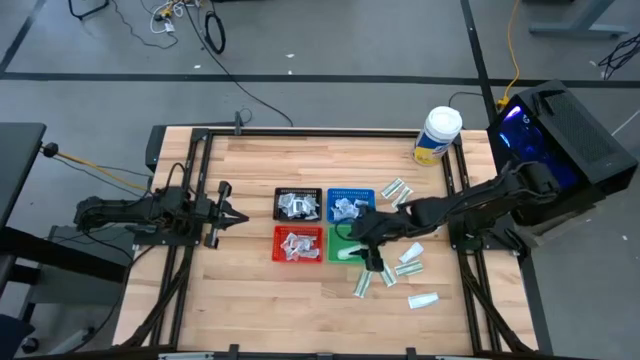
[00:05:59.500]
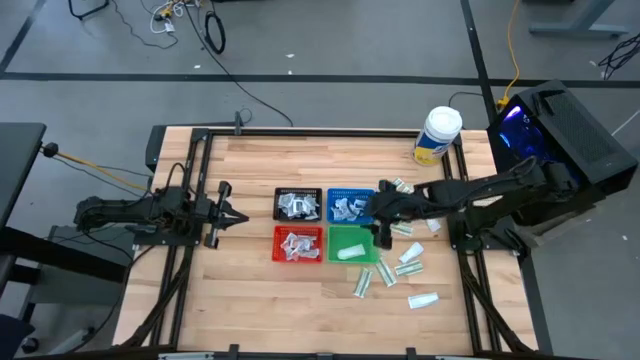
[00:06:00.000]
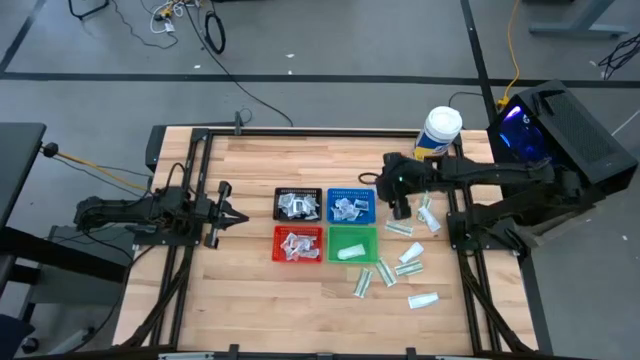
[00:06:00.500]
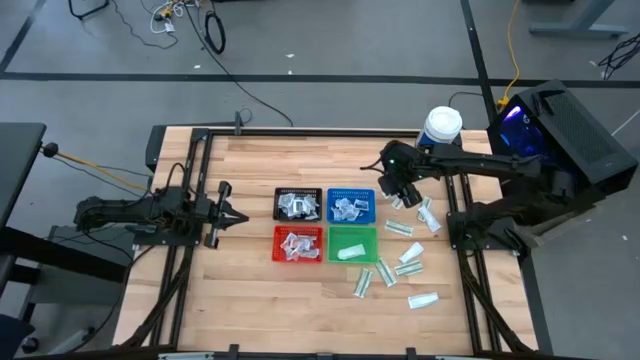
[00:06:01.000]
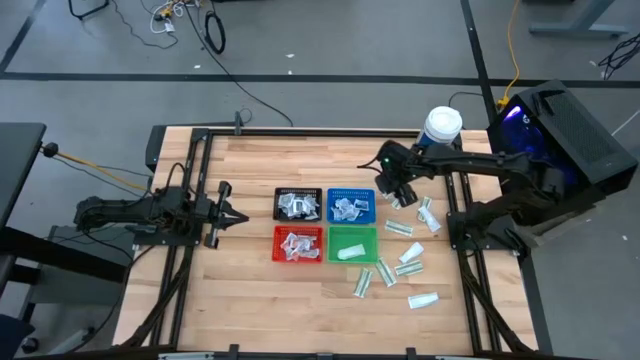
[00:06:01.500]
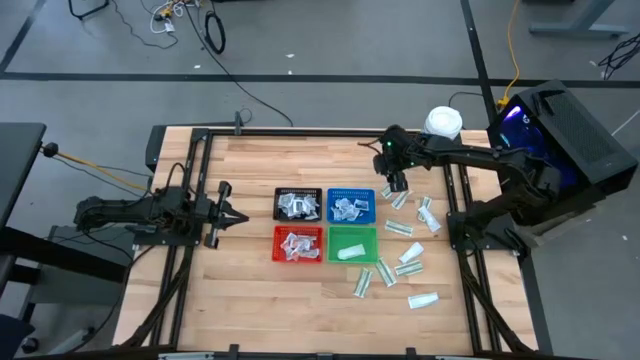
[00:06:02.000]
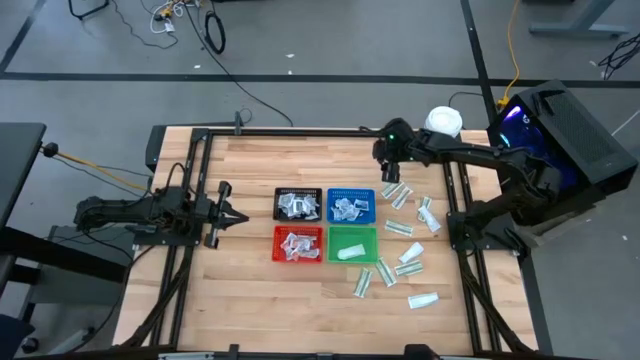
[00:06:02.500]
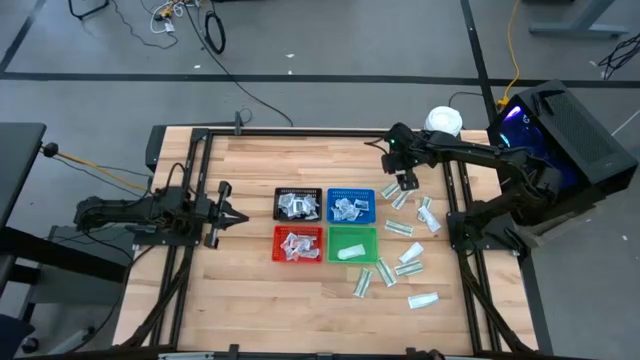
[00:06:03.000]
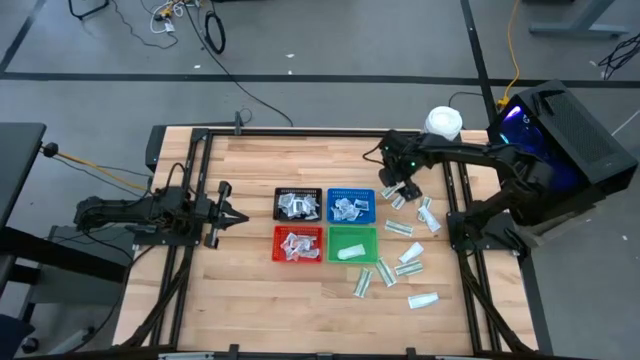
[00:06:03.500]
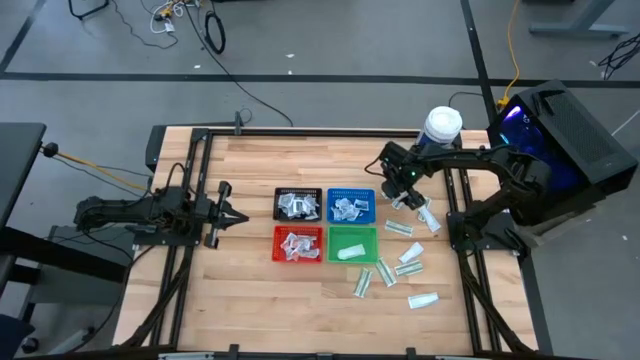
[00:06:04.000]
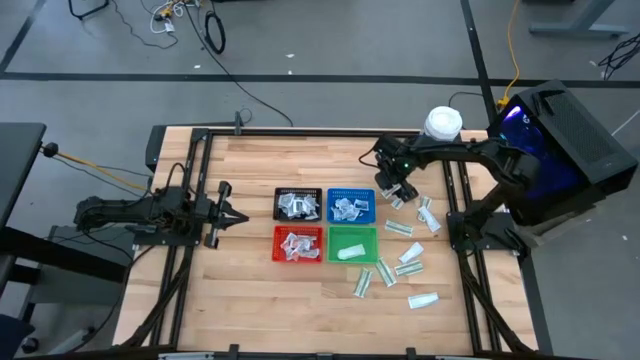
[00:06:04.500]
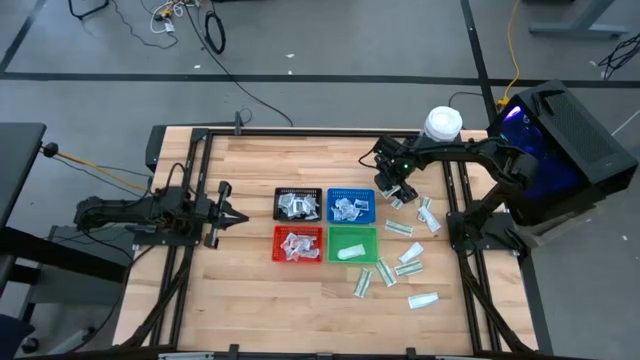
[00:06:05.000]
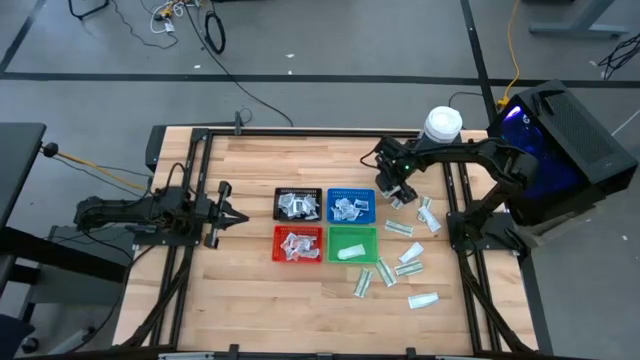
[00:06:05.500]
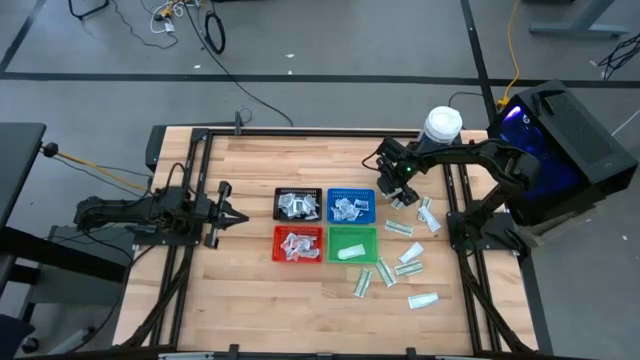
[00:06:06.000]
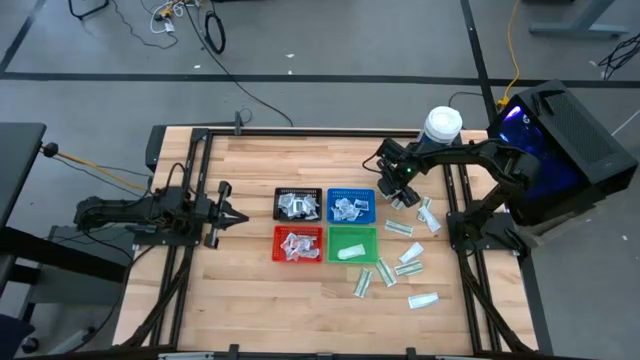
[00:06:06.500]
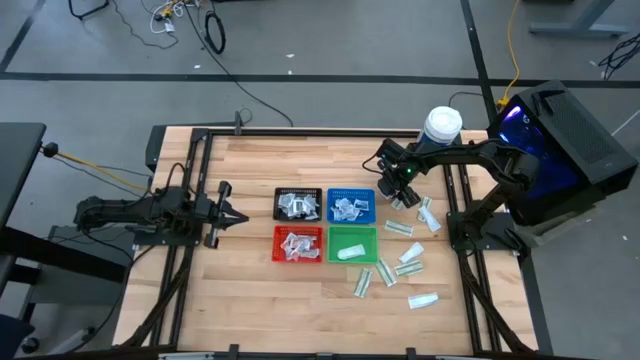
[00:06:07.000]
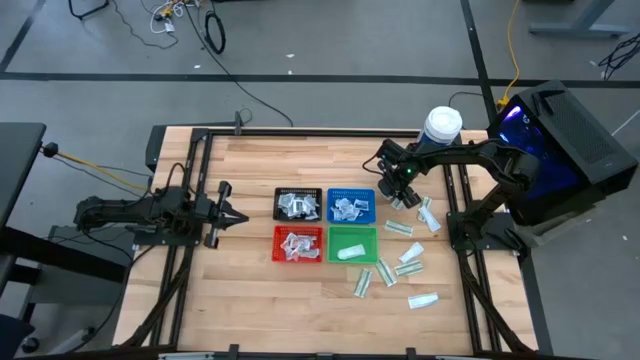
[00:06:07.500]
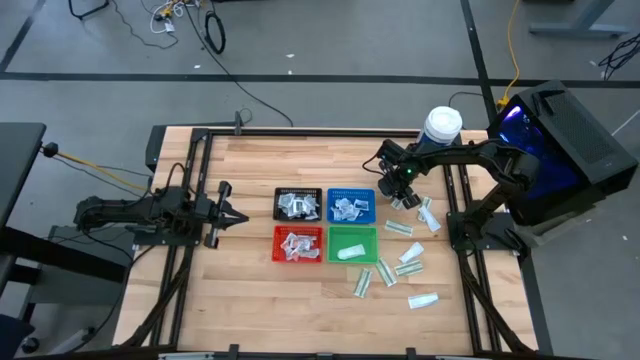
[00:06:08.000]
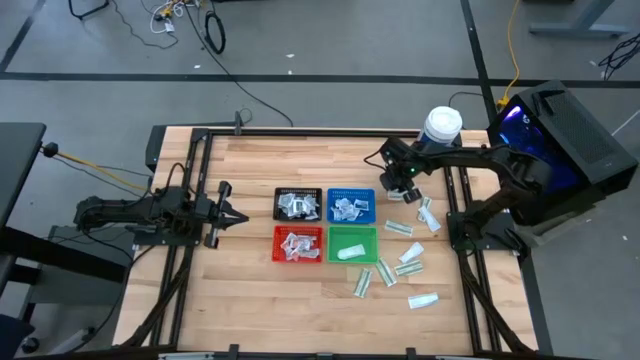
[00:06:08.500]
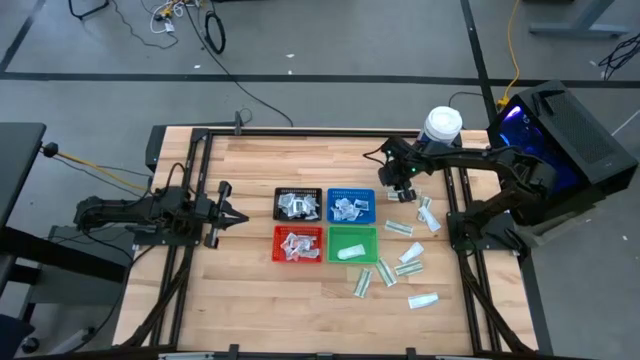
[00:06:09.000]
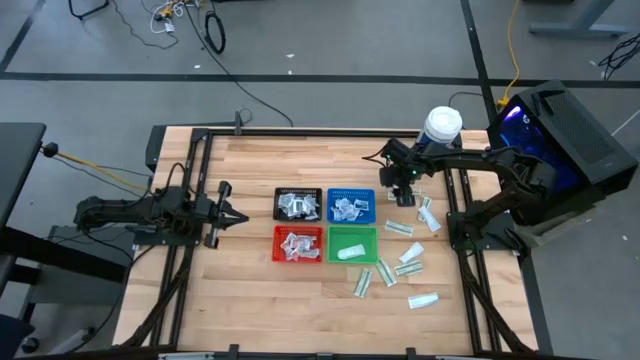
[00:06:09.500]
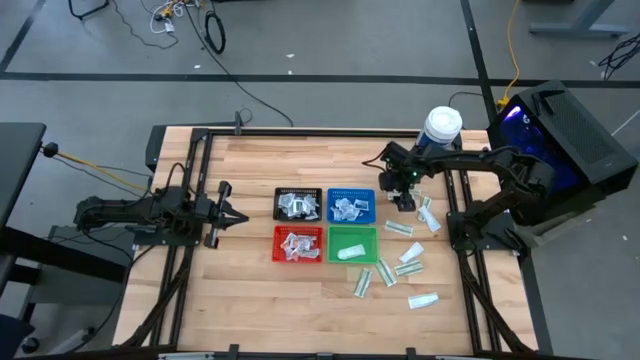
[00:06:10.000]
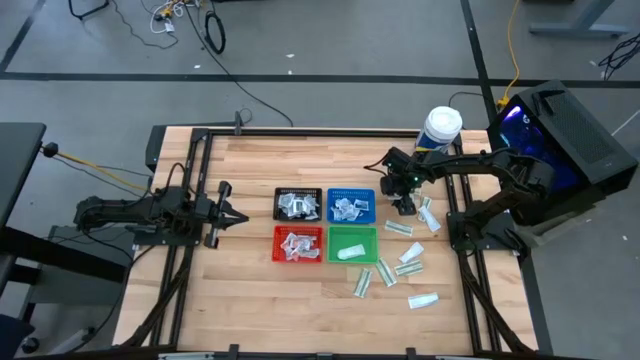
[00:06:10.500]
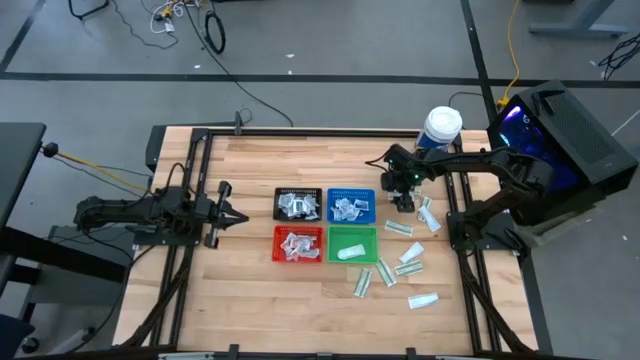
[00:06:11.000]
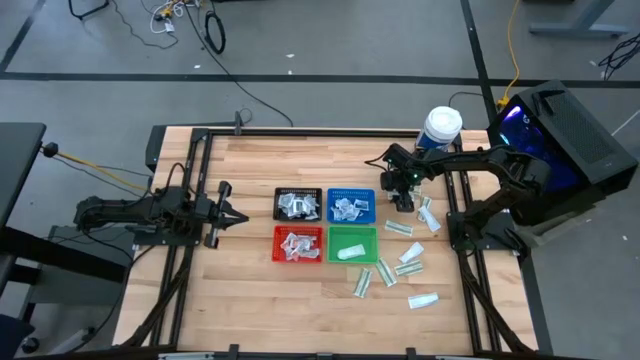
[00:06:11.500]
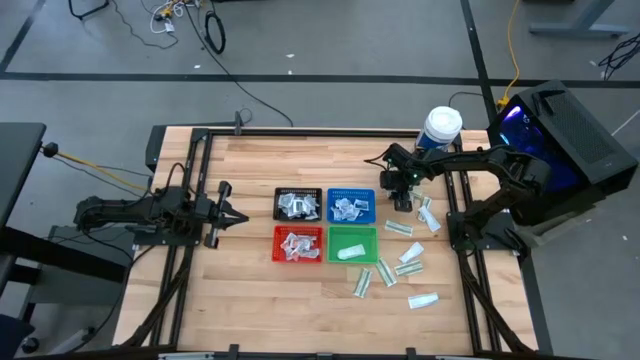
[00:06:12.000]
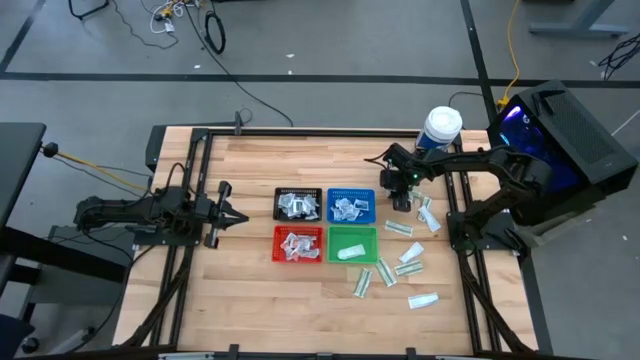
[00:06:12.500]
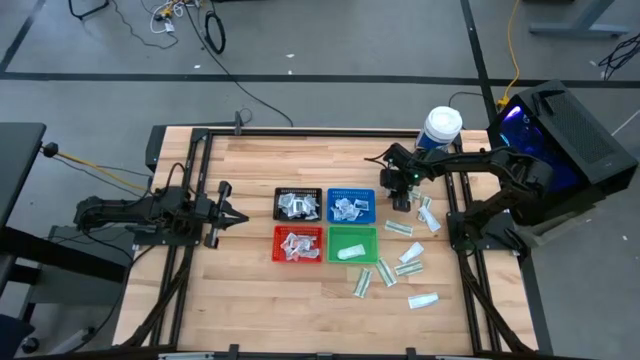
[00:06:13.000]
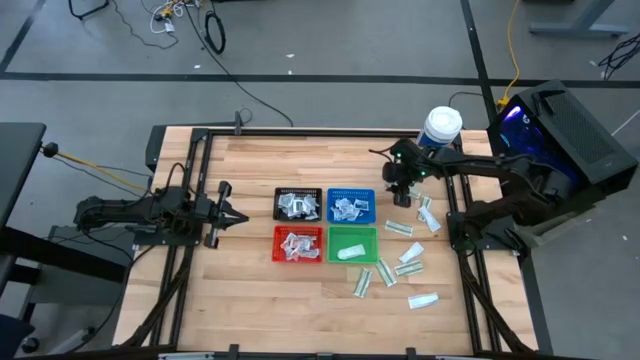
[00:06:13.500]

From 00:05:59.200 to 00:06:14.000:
Task: Pick & Place First Aid Supplies
Put the green bandage pack into the green bin

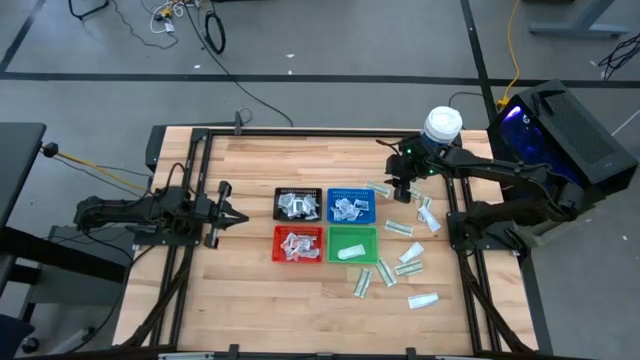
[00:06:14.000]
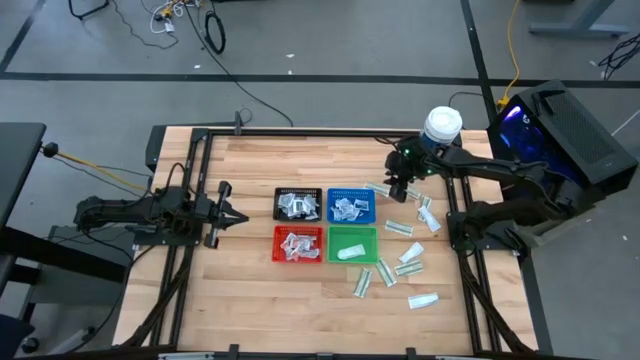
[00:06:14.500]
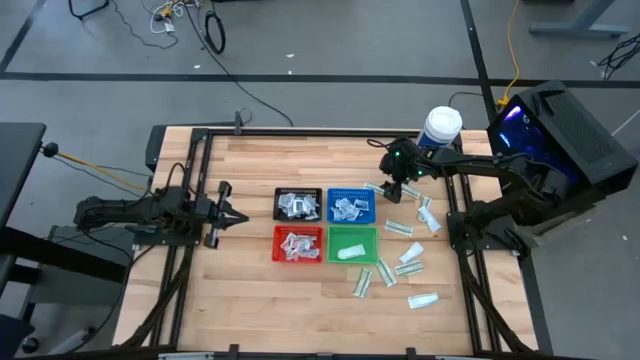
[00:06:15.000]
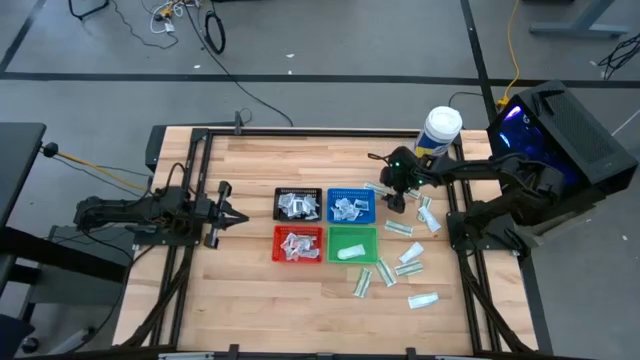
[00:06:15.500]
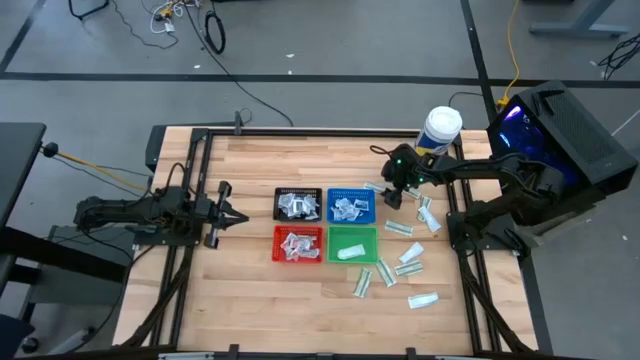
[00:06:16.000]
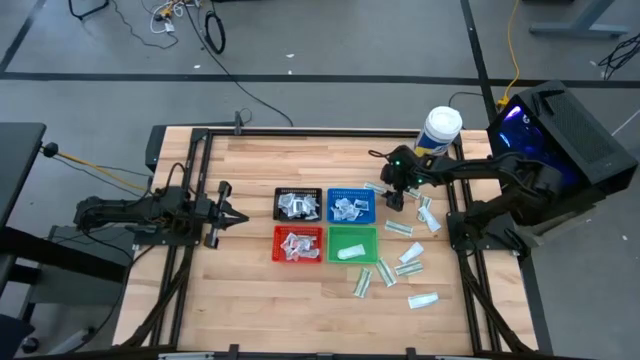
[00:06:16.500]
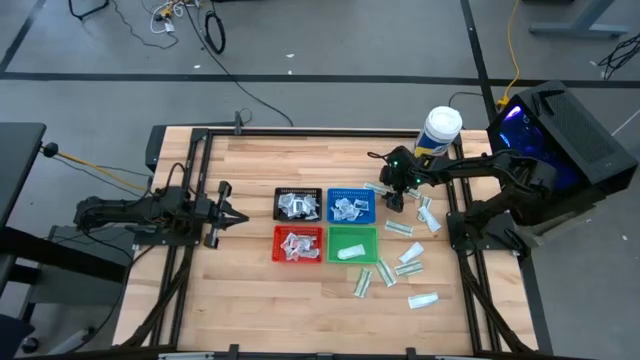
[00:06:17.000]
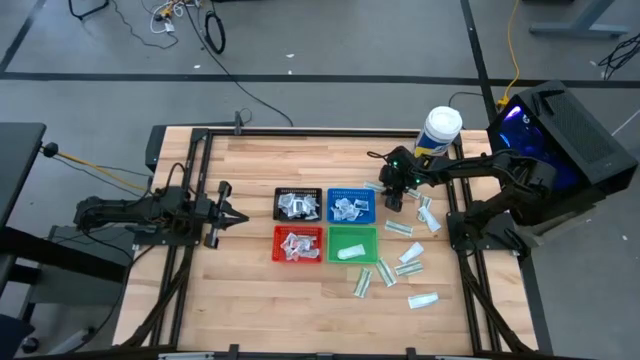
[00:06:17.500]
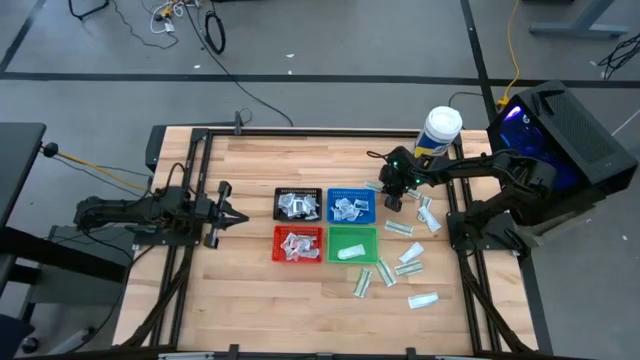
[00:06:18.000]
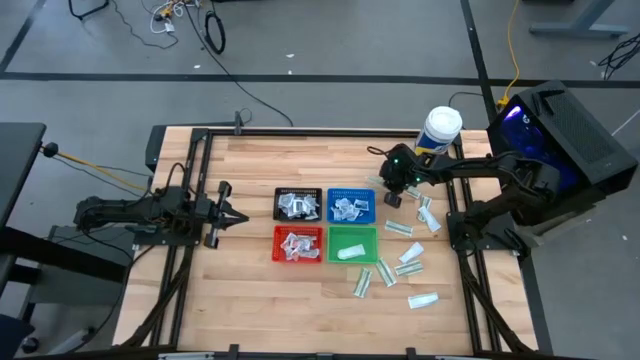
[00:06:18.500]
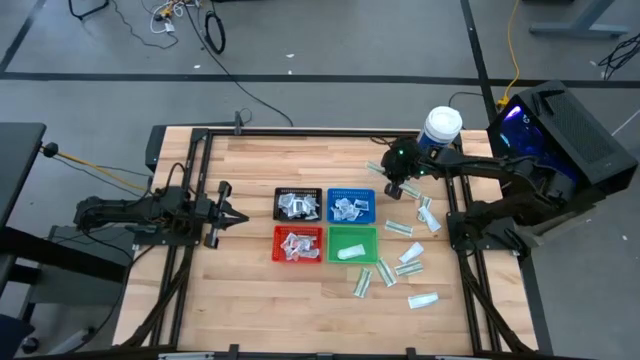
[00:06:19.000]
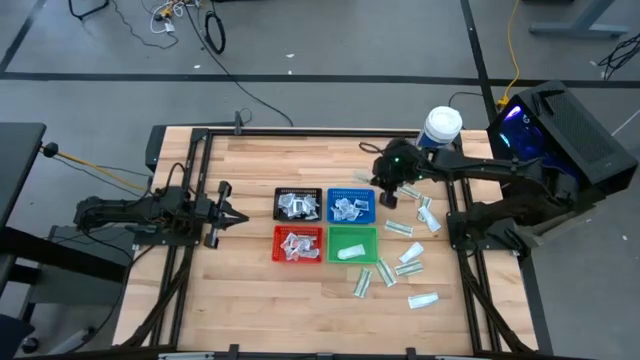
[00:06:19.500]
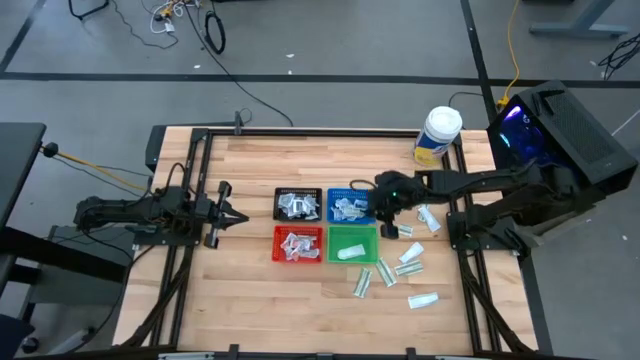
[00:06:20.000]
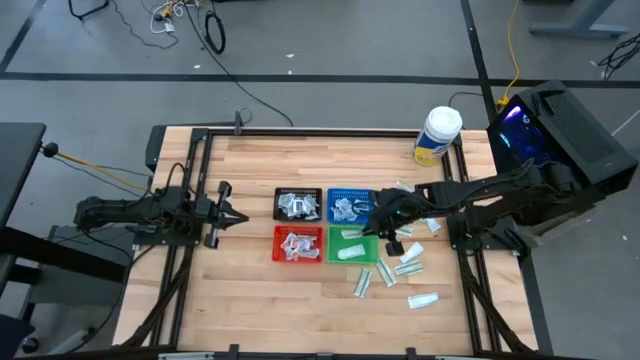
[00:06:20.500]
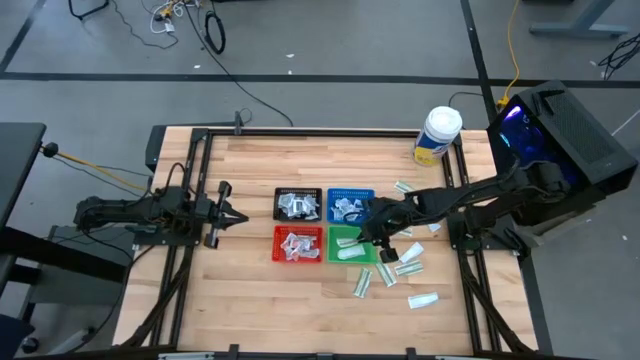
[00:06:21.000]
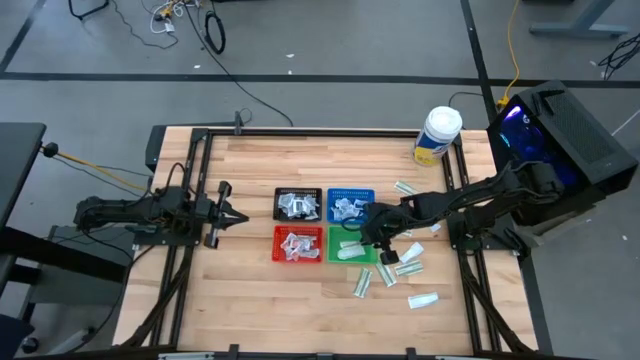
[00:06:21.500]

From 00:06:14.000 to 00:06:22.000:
Put the green bandage pack into the green bin
